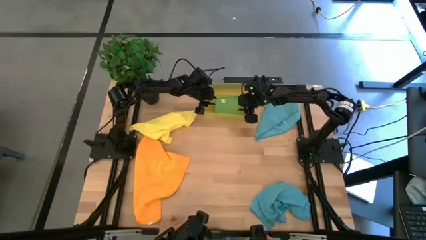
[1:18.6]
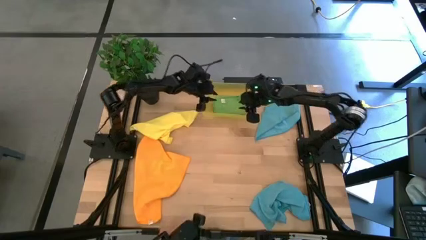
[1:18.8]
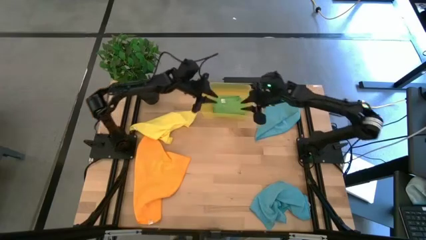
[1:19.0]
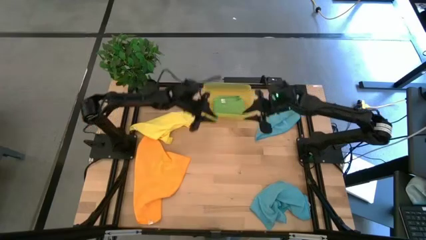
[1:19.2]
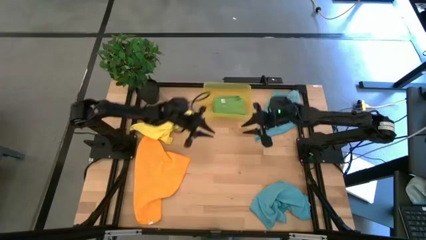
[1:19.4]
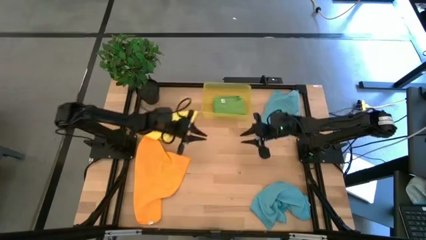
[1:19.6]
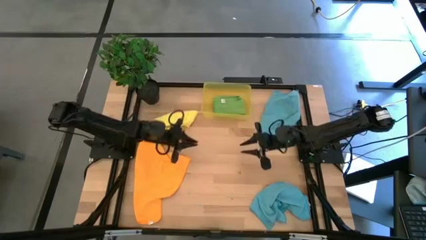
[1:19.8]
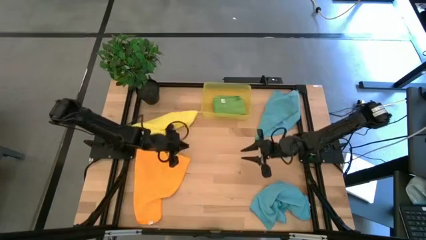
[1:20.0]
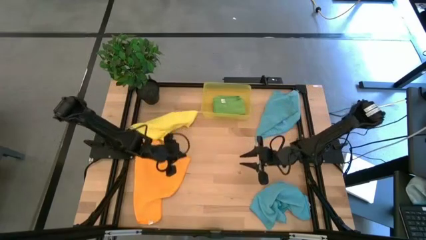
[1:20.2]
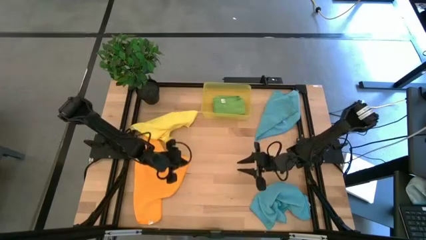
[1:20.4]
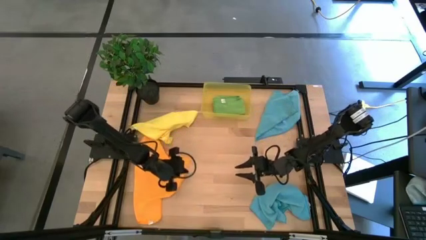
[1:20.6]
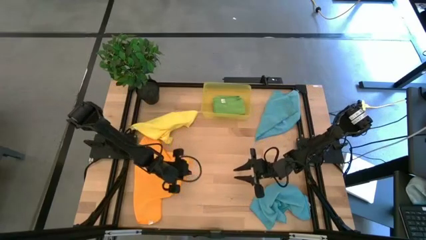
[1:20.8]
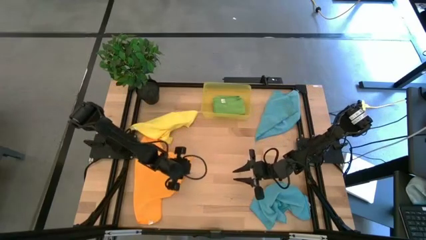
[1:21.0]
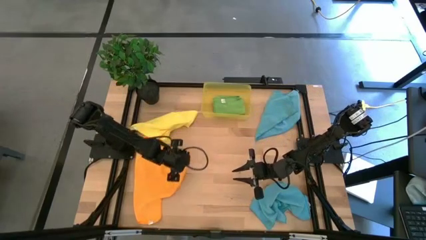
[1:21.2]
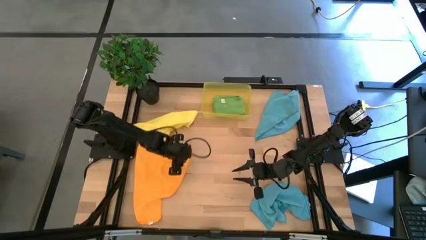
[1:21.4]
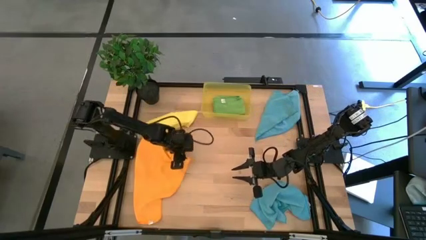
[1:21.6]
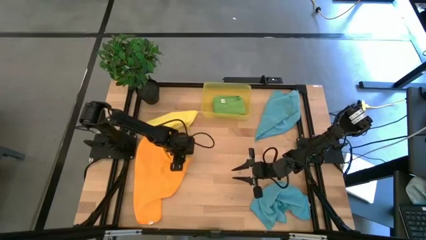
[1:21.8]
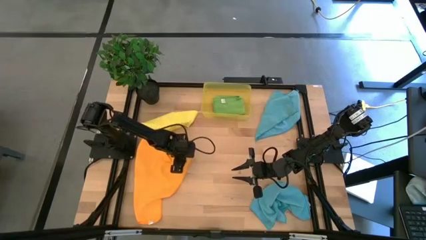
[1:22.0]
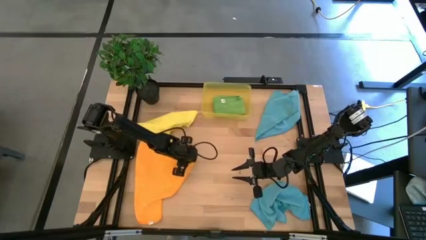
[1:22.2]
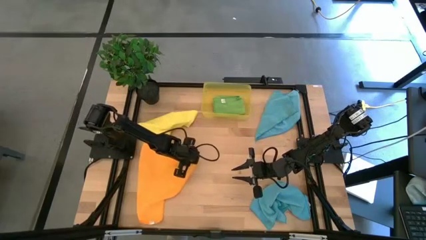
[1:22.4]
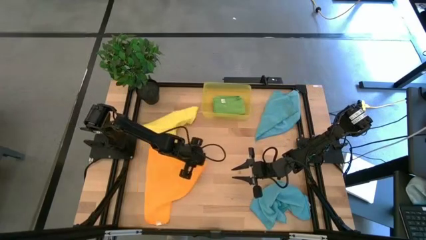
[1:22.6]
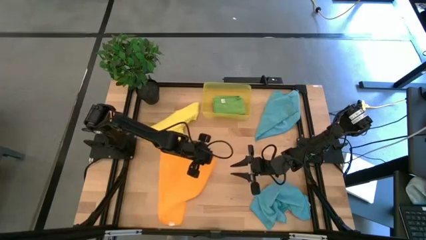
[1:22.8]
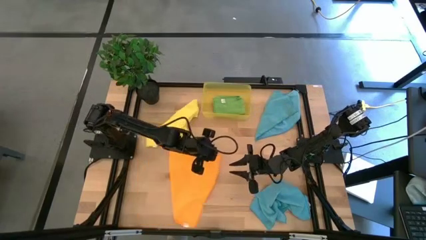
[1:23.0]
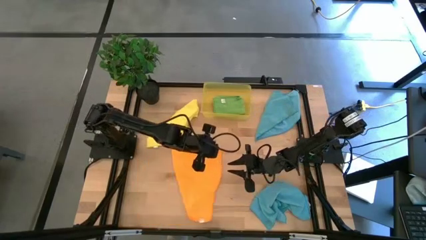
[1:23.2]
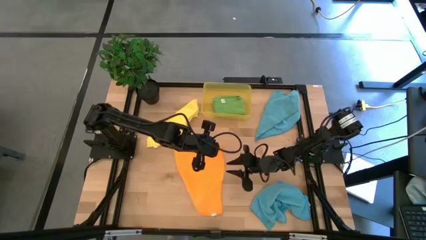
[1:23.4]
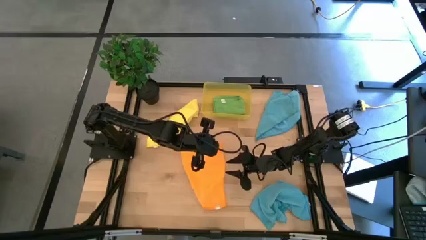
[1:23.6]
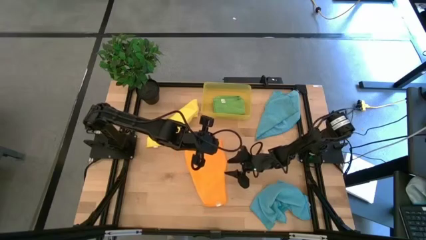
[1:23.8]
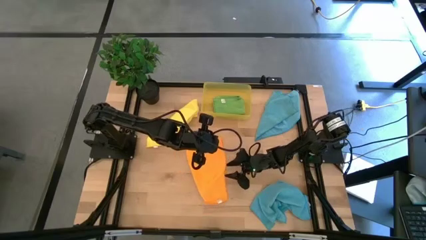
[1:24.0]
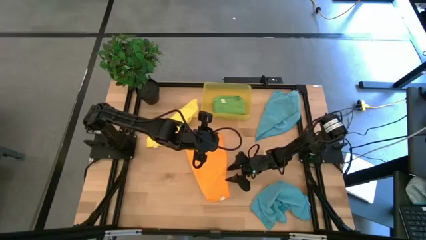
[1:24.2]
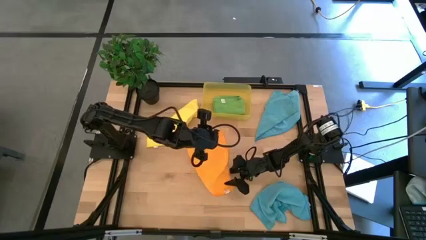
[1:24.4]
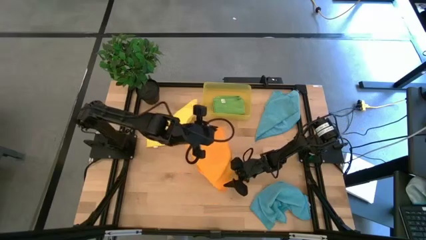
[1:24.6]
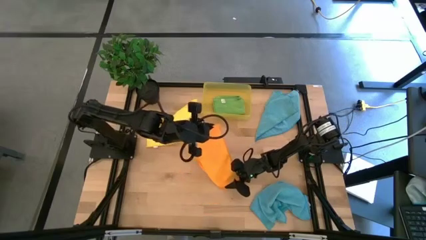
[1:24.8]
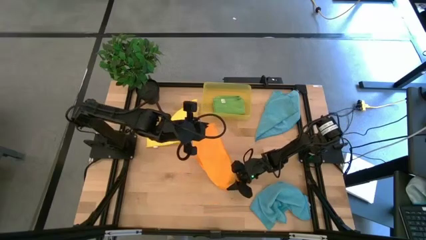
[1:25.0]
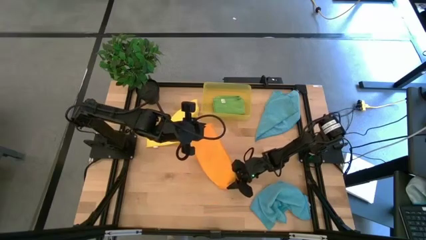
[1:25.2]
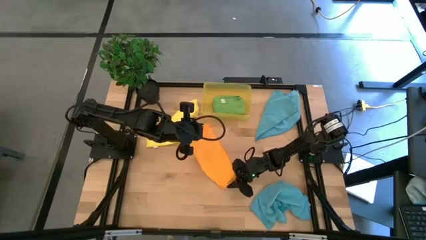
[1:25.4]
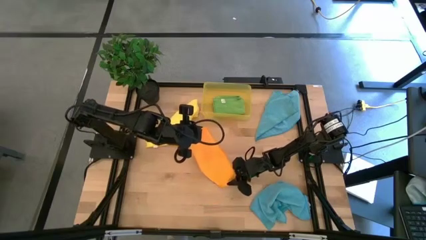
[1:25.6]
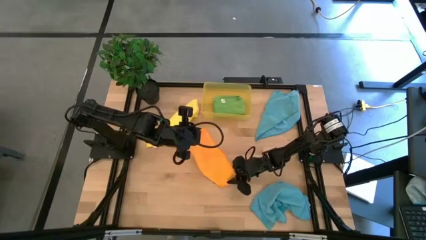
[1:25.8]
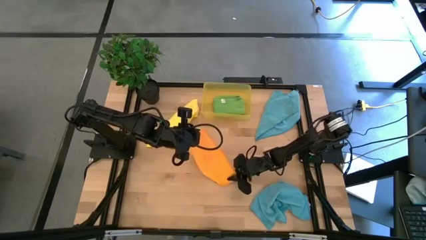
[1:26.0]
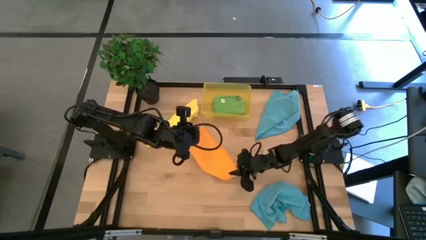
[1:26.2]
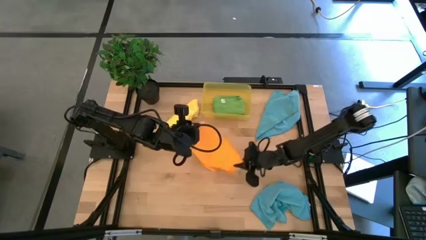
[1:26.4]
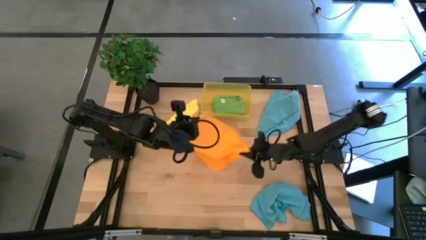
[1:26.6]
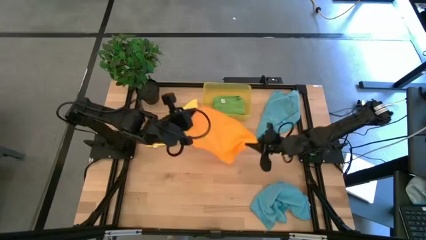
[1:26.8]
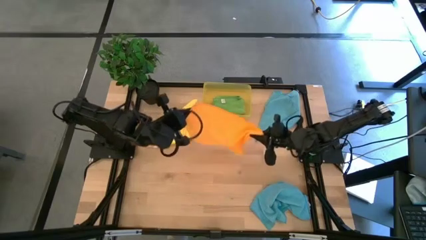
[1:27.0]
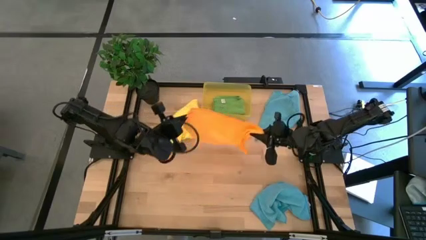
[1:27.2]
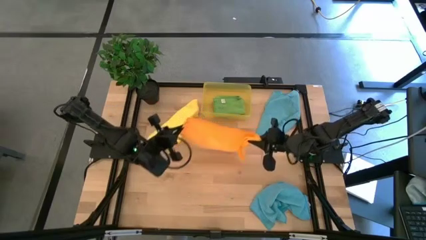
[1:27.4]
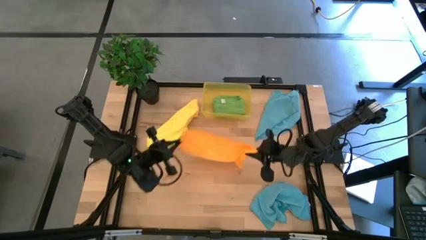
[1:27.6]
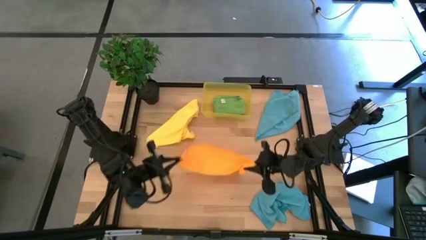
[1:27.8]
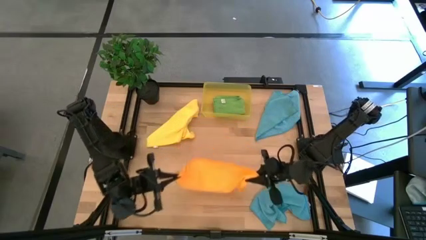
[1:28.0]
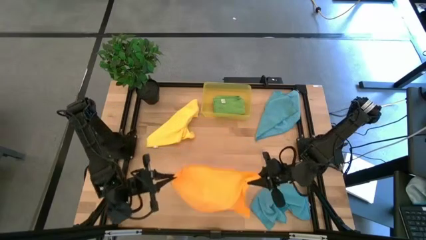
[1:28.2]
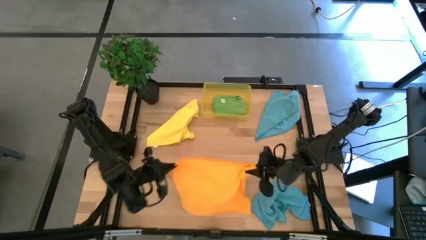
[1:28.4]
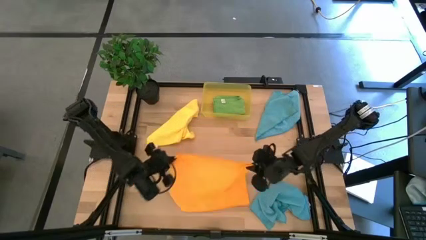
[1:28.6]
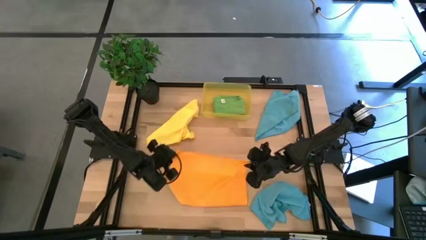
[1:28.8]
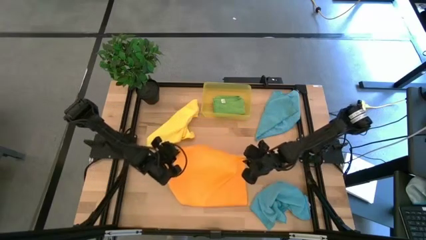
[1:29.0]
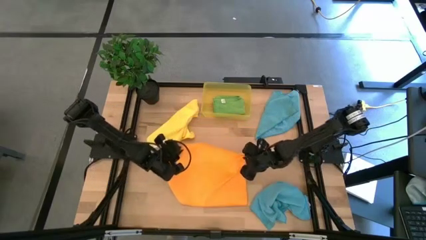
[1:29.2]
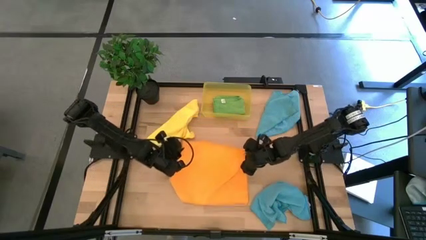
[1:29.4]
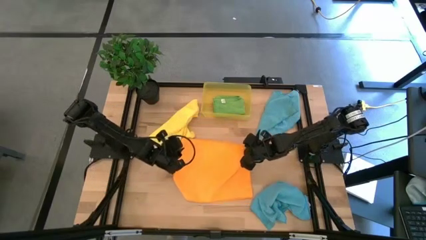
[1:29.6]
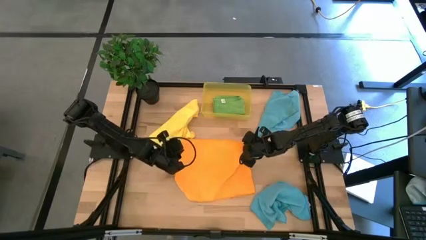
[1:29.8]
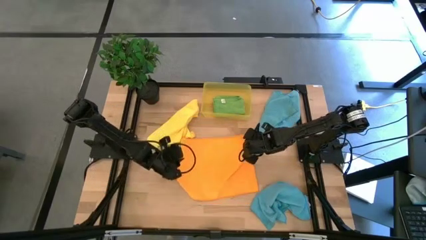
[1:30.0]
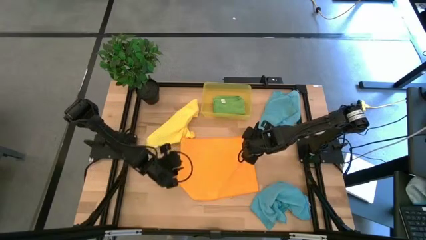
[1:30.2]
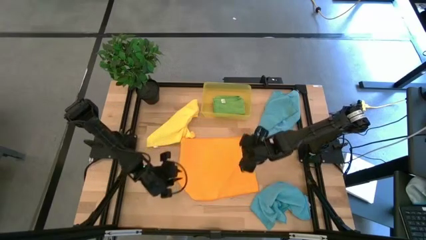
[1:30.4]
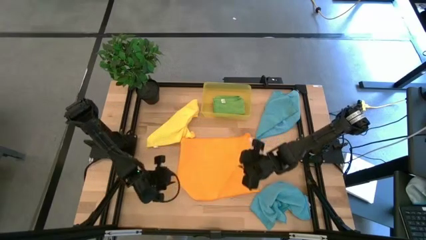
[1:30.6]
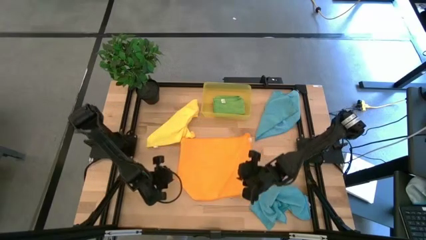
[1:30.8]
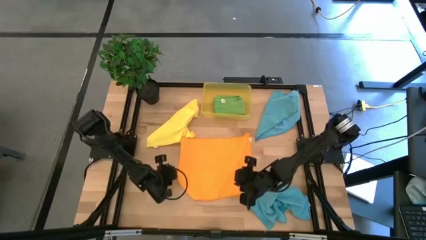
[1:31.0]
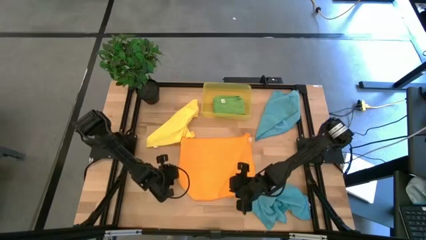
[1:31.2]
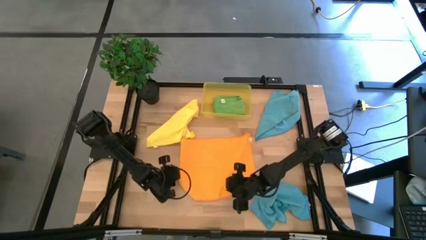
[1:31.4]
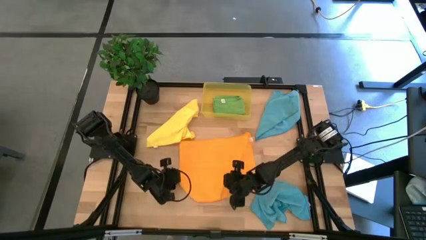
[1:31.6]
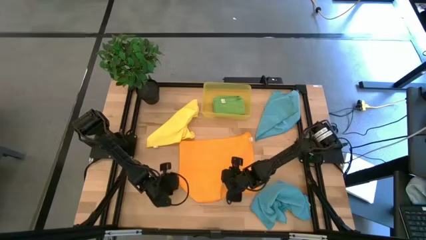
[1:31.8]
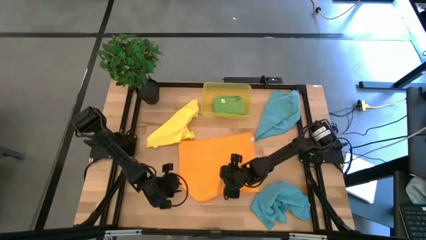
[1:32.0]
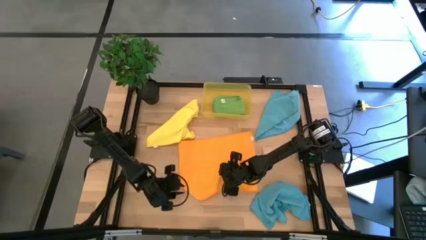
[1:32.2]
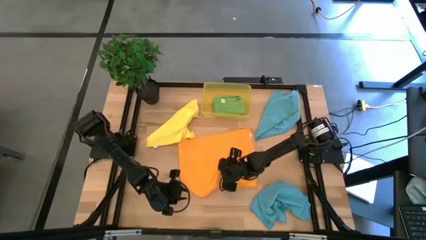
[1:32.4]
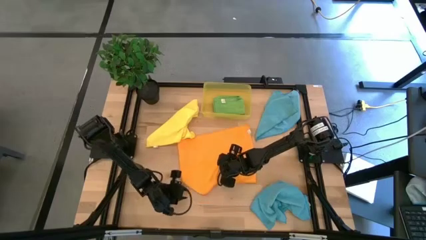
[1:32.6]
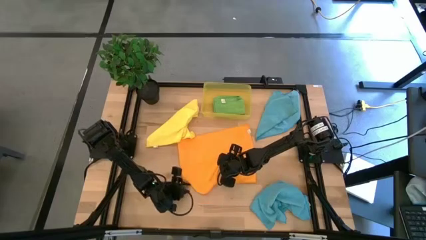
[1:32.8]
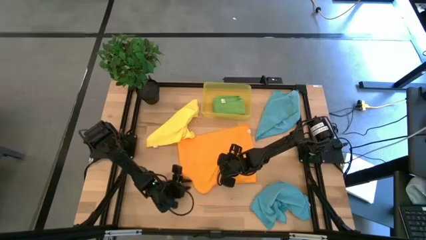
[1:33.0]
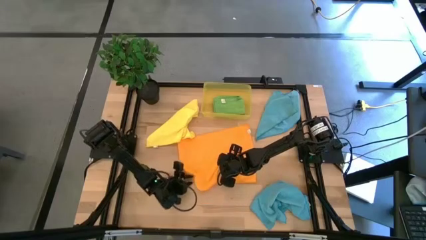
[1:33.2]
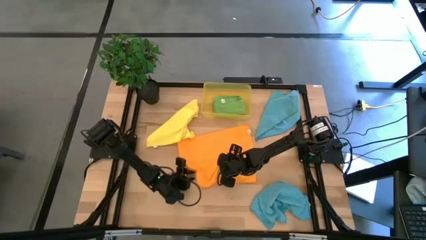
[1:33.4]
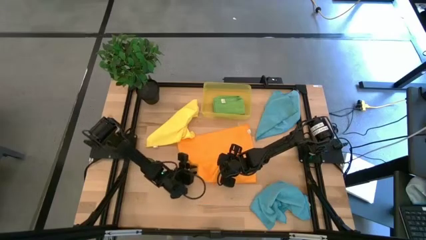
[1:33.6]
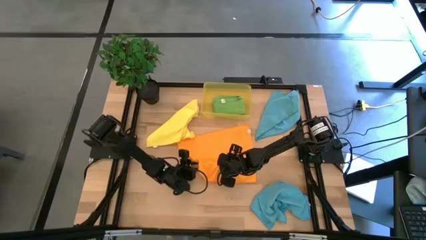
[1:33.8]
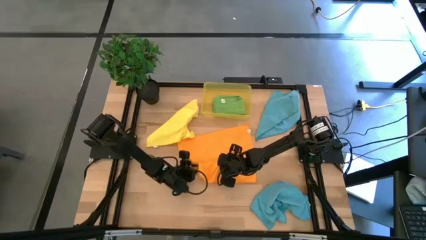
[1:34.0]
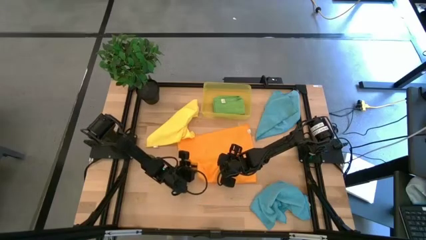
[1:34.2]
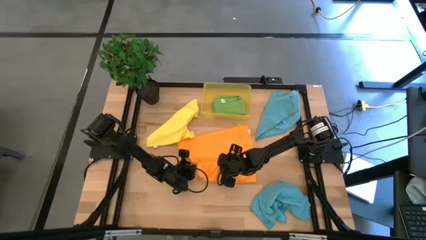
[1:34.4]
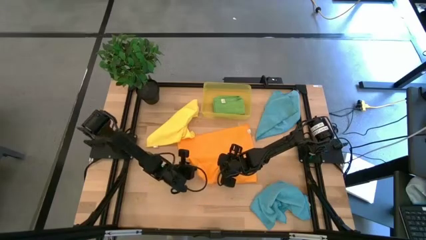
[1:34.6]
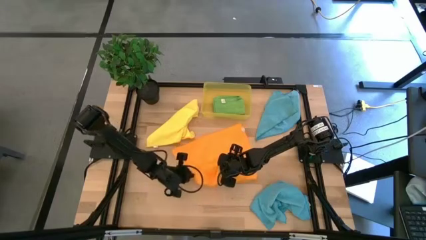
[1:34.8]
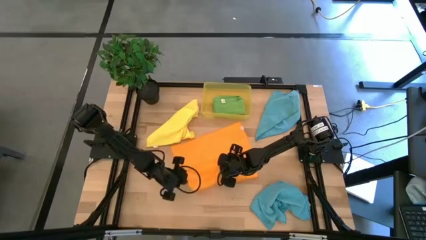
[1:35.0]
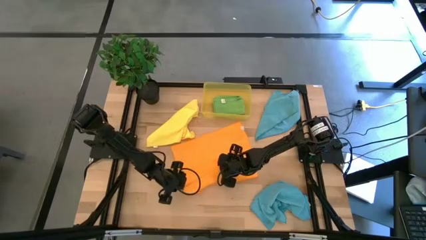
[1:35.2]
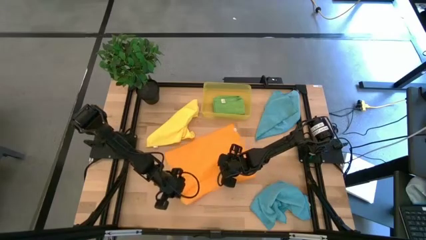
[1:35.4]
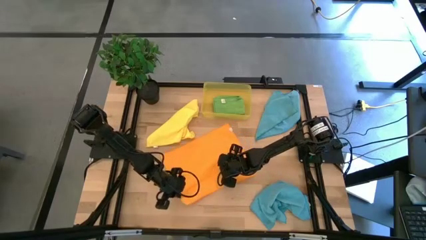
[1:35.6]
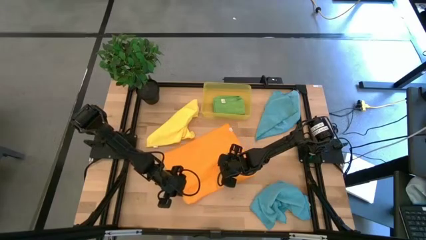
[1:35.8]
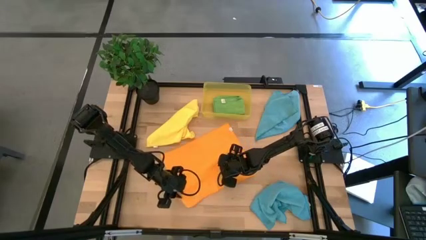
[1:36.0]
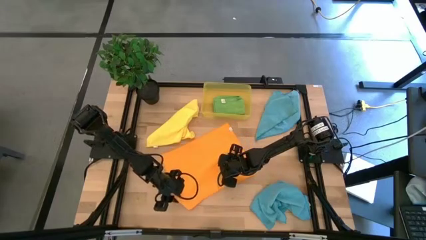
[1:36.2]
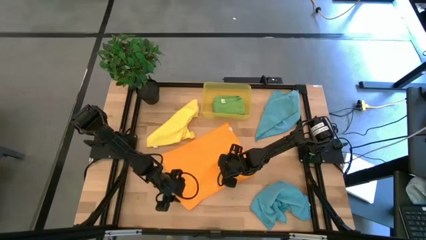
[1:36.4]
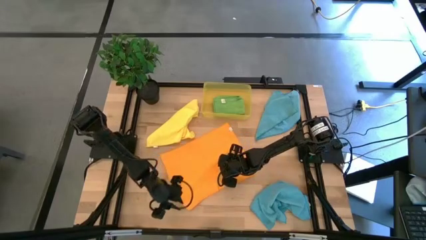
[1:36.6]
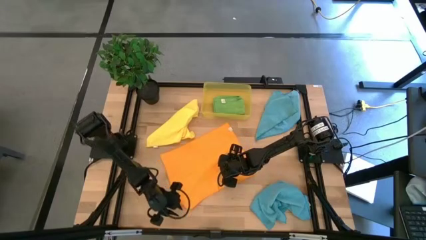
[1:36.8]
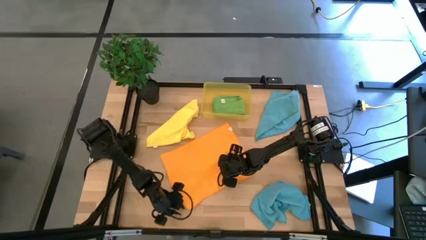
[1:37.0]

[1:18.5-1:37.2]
Task: Fold microfiber towels
Fold the orange microfiber cloth
